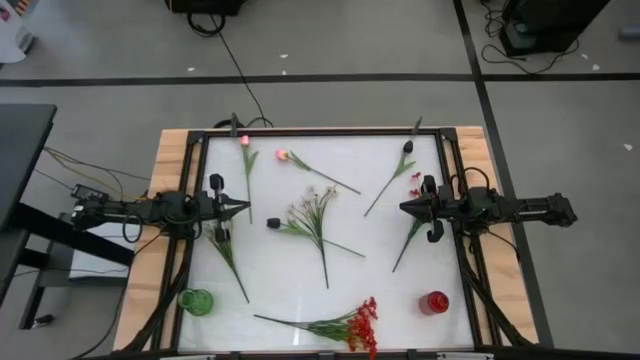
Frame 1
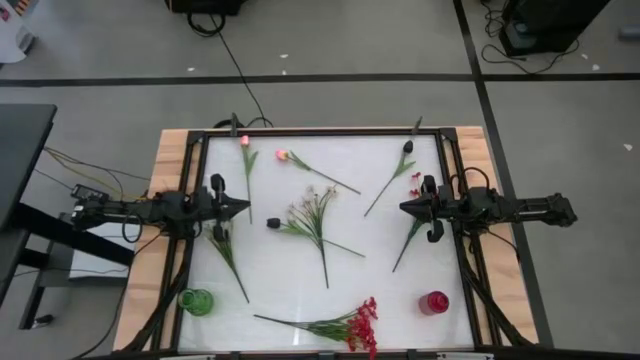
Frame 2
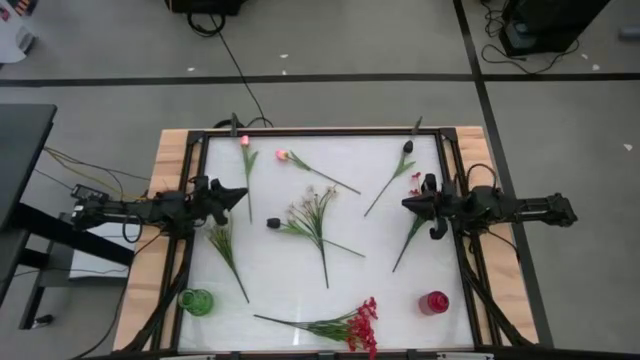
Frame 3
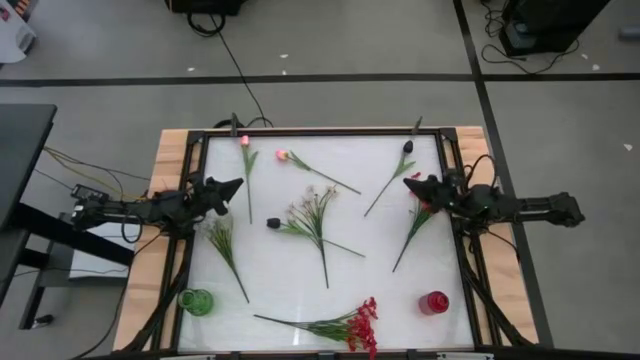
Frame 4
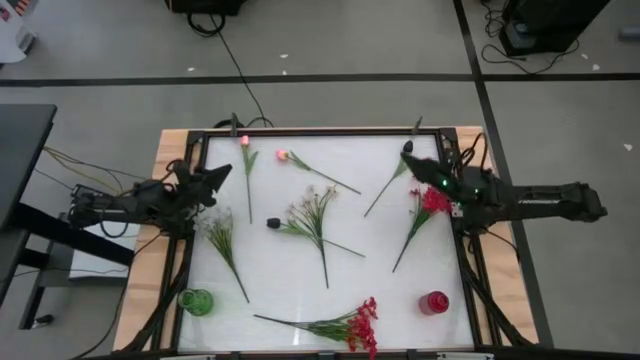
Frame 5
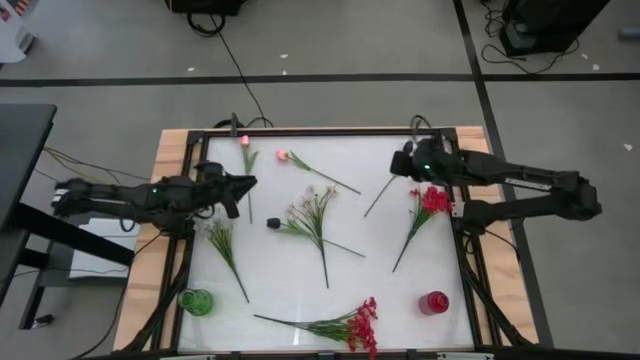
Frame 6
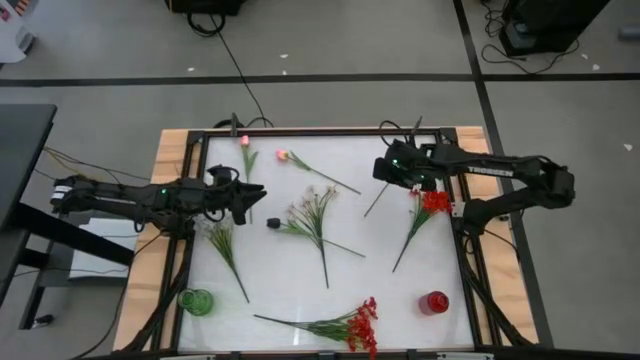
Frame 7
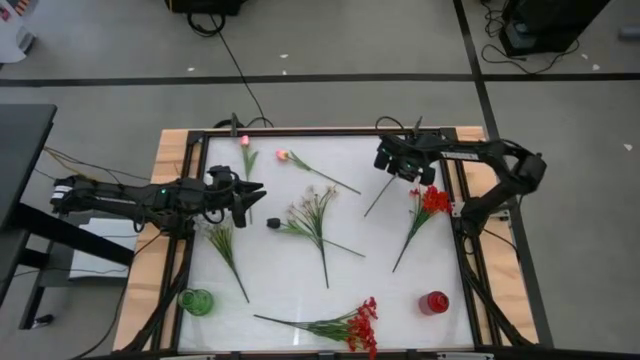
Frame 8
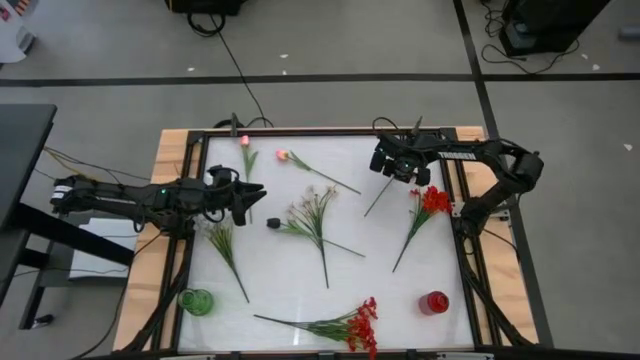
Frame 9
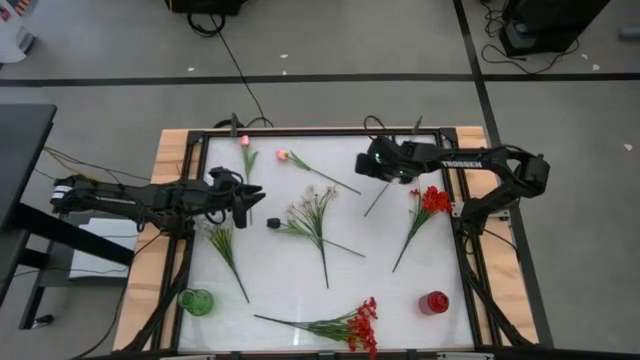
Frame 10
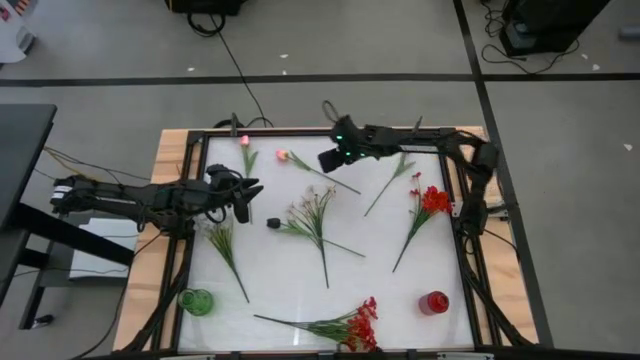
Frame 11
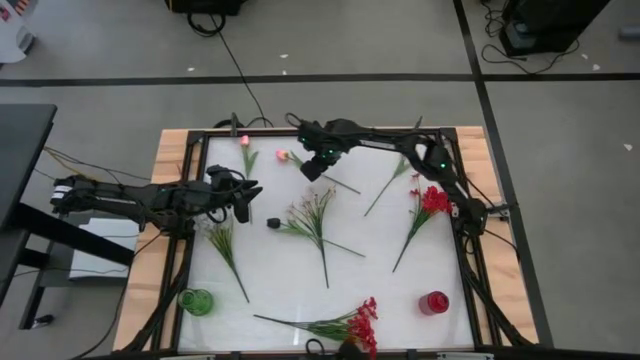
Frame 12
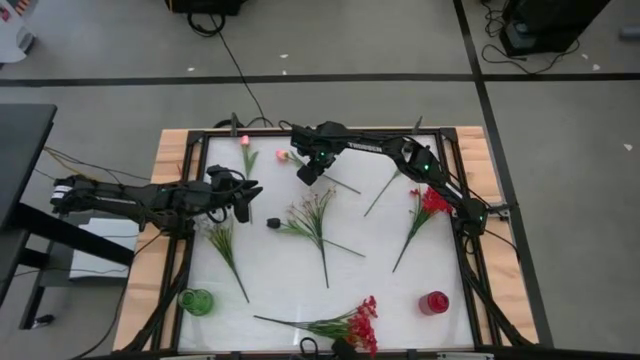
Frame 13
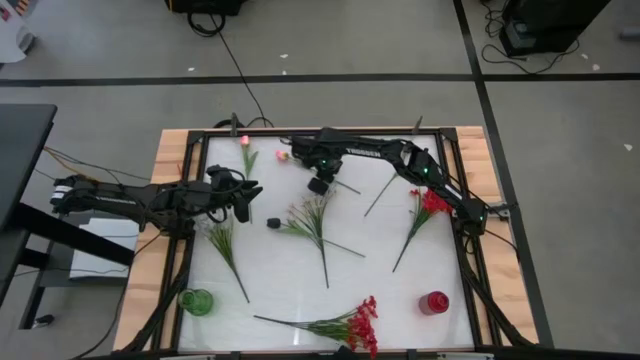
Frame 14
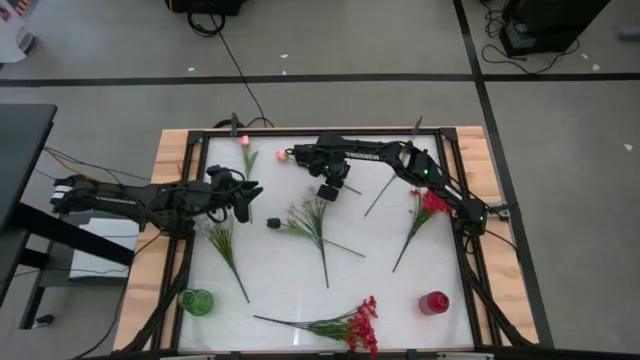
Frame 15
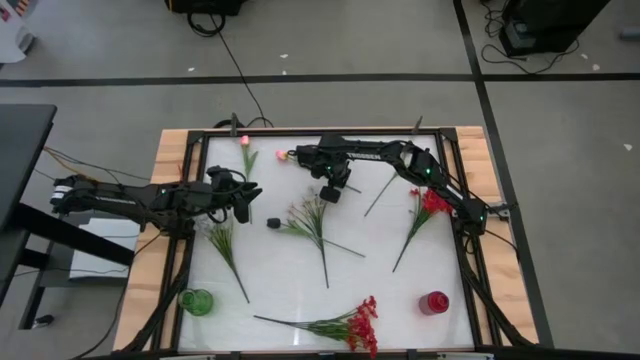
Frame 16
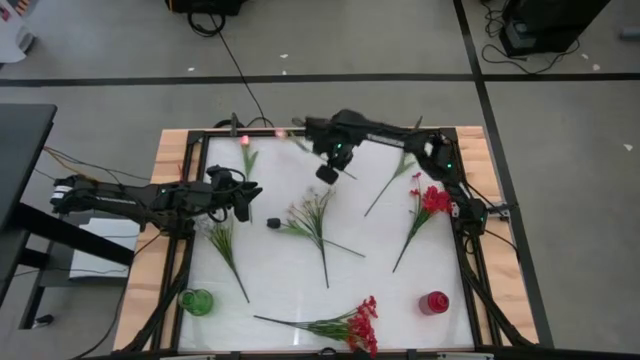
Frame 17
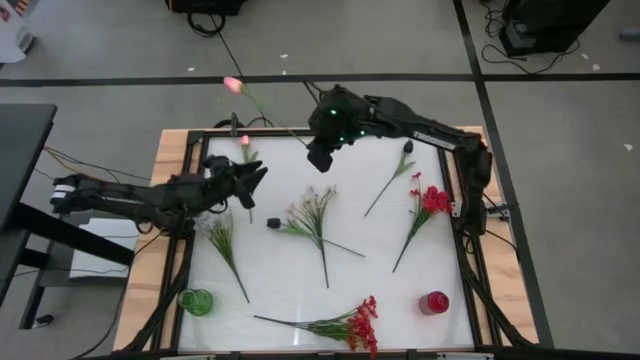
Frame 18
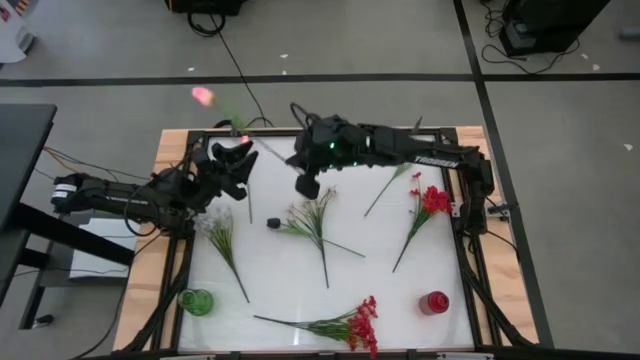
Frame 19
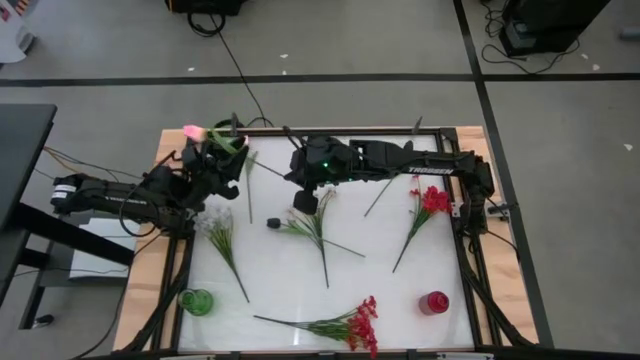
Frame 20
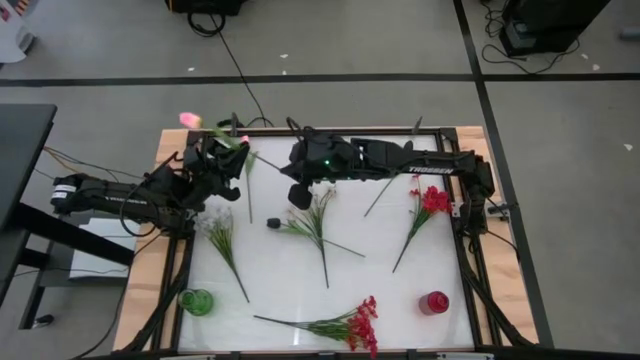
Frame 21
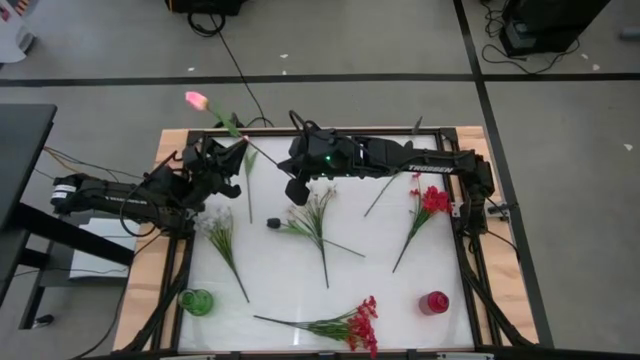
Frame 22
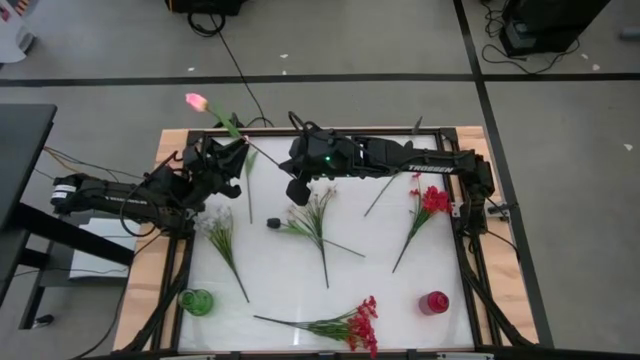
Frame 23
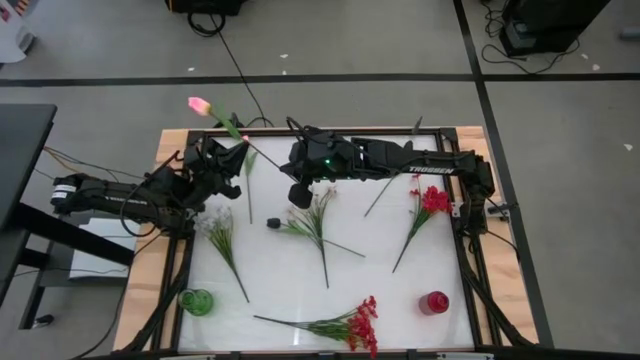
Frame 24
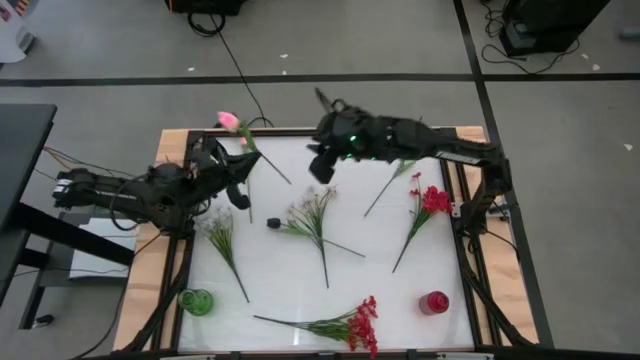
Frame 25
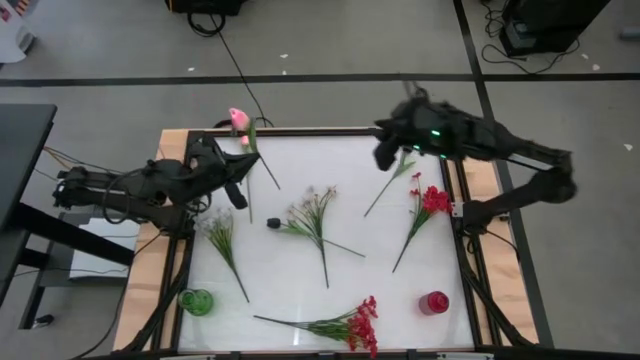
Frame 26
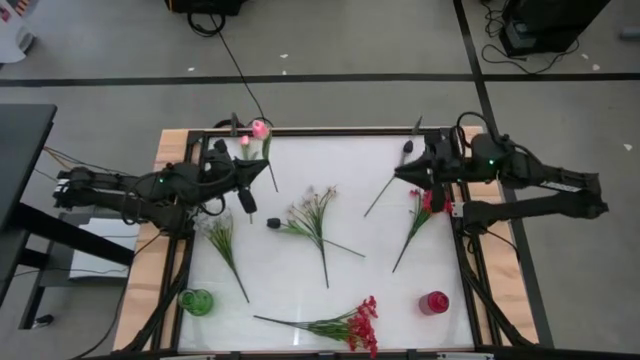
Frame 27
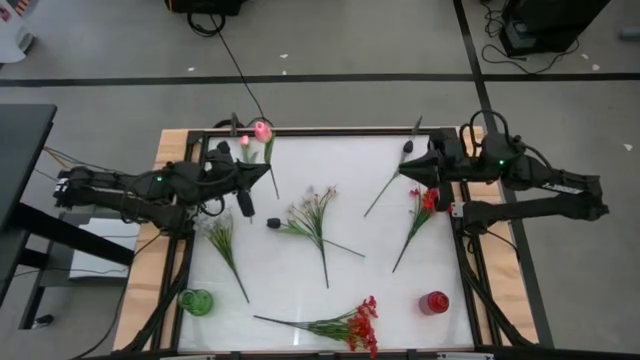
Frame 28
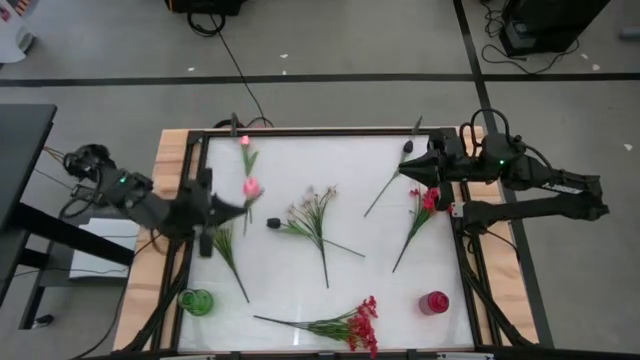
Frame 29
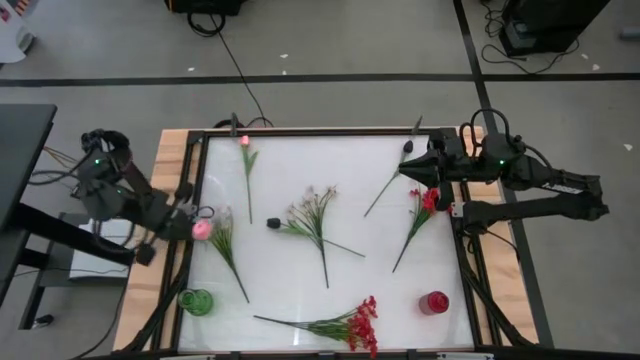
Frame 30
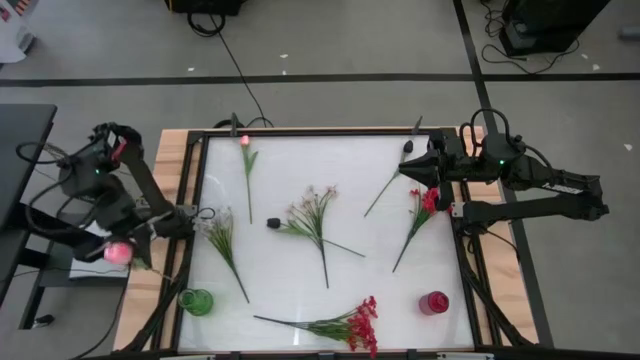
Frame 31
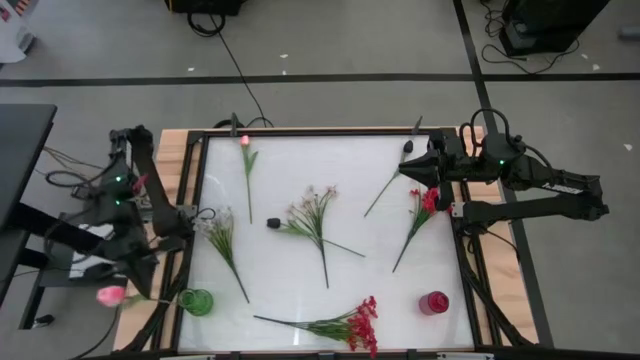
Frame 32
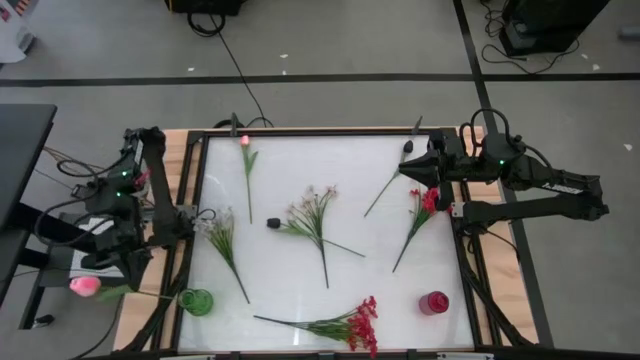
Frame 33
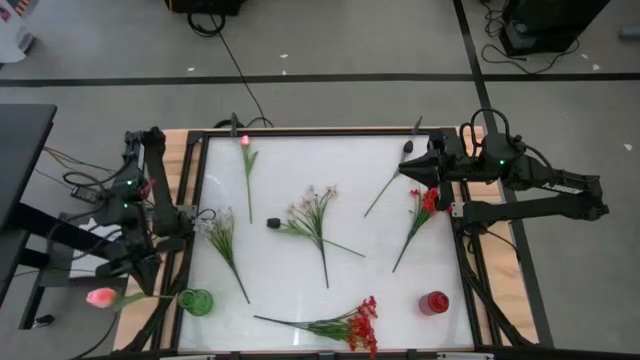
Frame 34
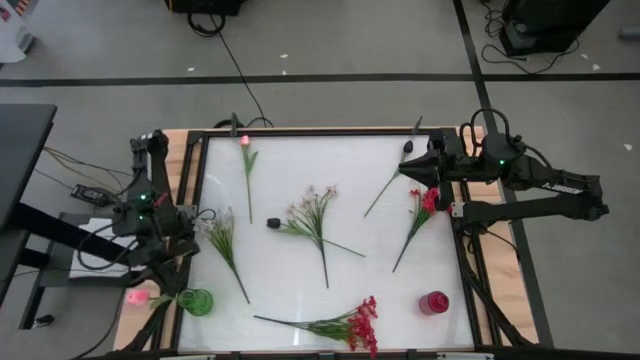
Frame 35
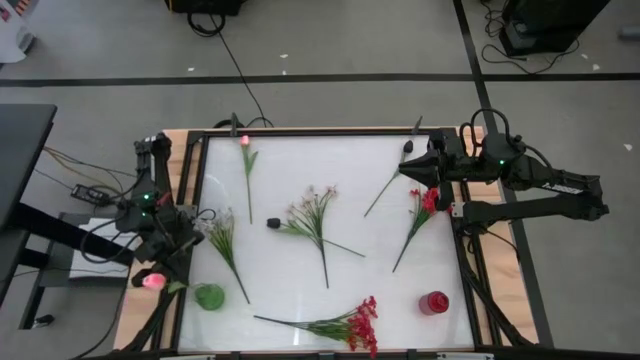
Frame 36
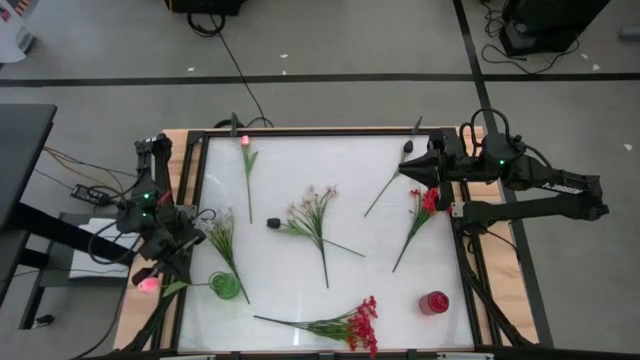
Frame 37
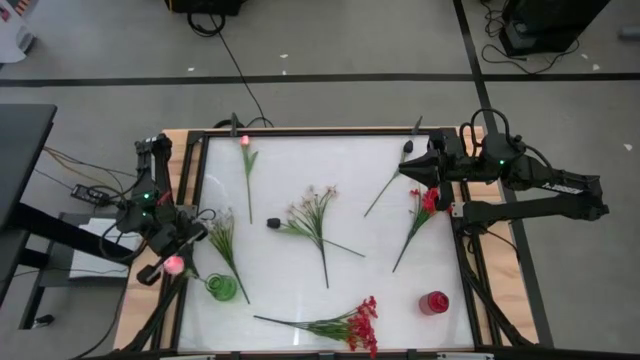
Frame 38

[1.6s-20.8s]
Task: Sort flowers into vase by color
Put the right pink flower into the green vase
